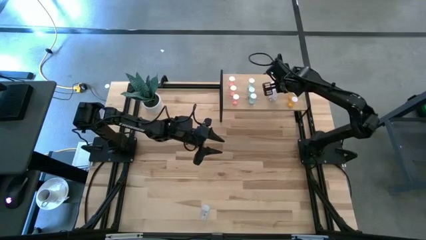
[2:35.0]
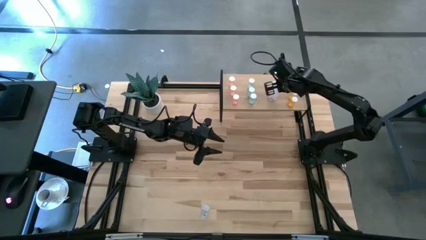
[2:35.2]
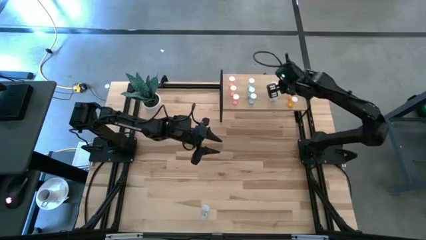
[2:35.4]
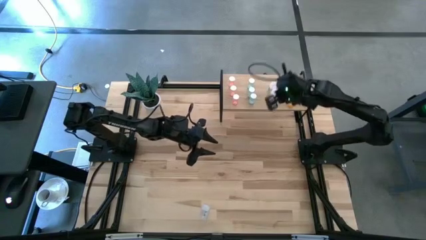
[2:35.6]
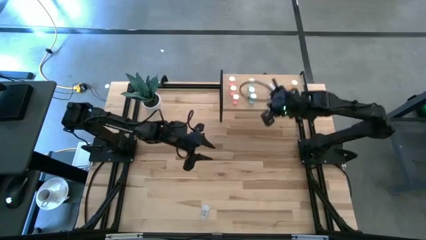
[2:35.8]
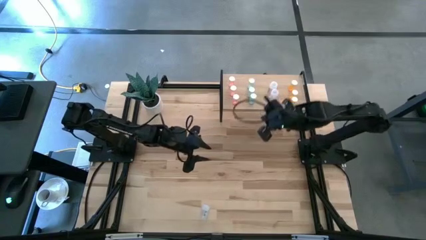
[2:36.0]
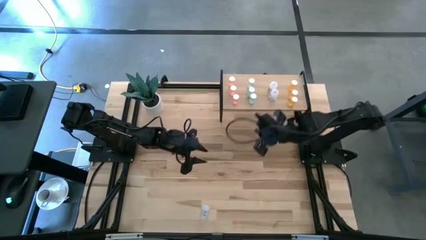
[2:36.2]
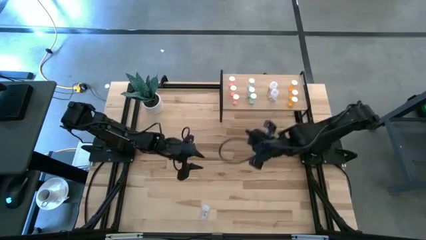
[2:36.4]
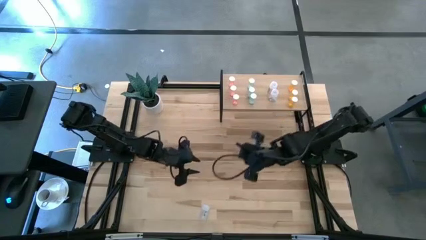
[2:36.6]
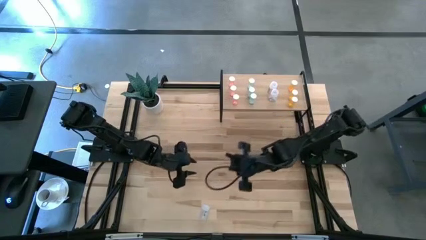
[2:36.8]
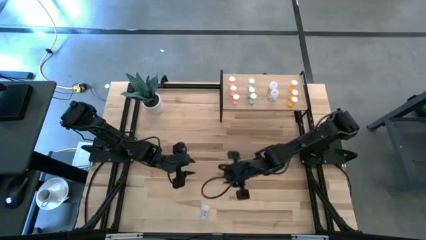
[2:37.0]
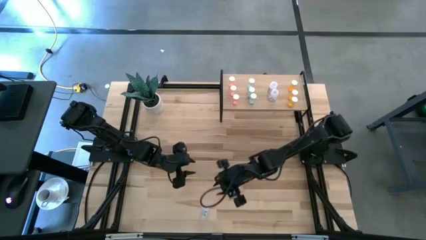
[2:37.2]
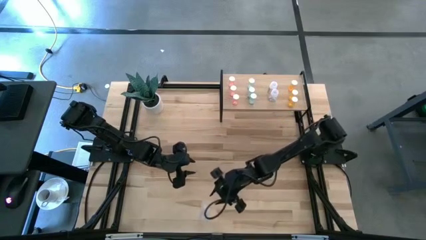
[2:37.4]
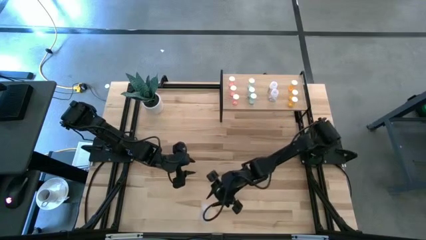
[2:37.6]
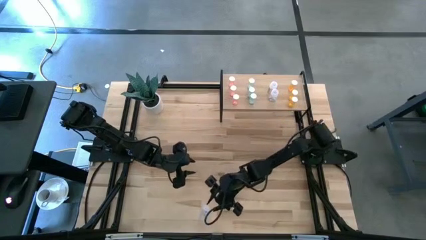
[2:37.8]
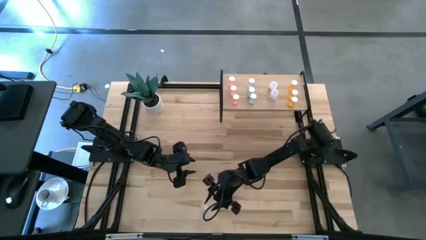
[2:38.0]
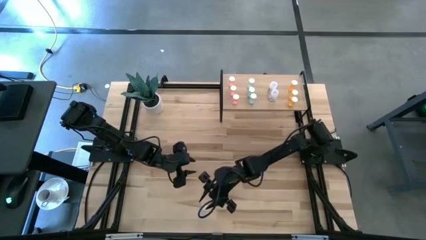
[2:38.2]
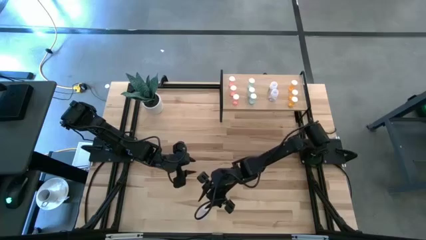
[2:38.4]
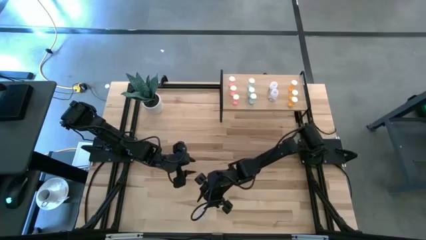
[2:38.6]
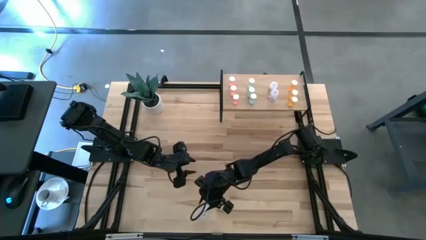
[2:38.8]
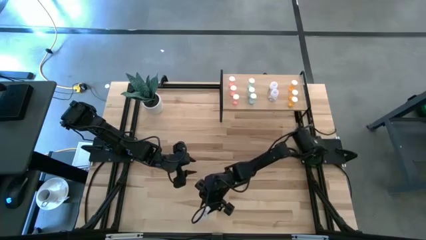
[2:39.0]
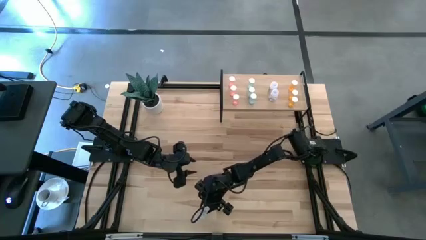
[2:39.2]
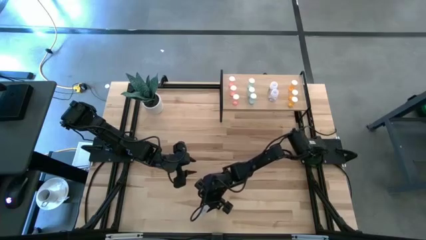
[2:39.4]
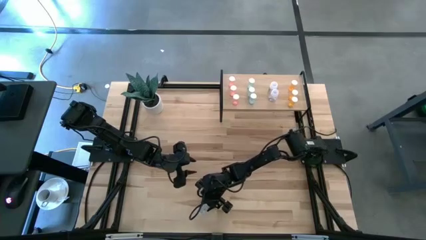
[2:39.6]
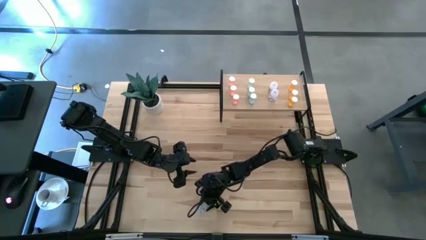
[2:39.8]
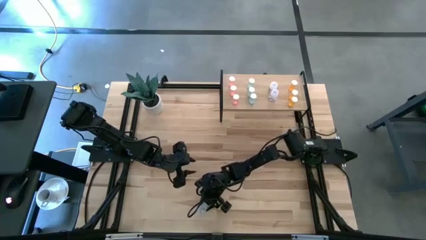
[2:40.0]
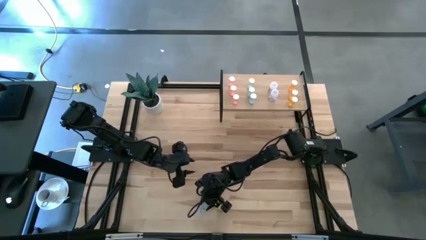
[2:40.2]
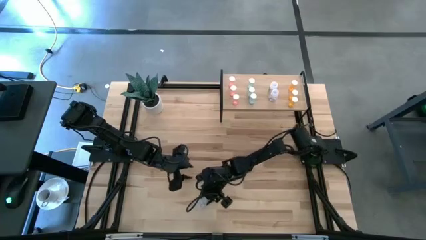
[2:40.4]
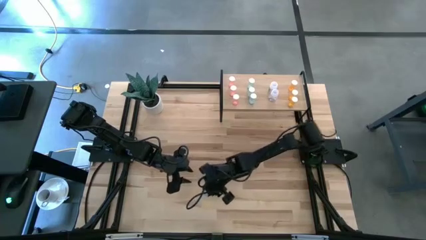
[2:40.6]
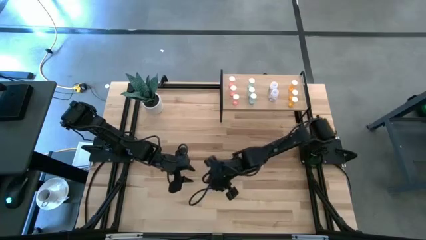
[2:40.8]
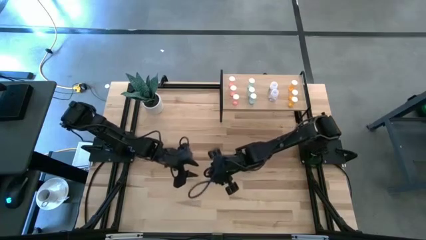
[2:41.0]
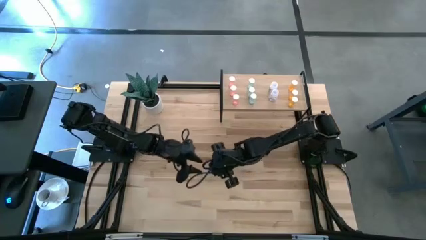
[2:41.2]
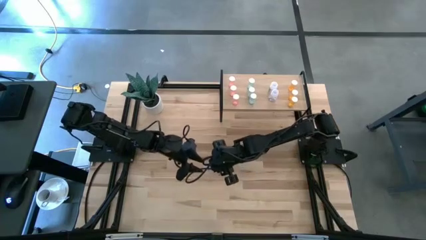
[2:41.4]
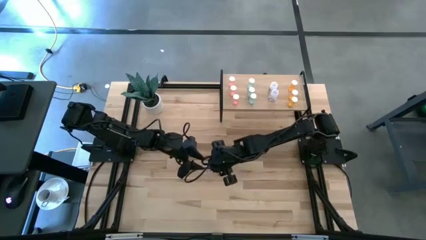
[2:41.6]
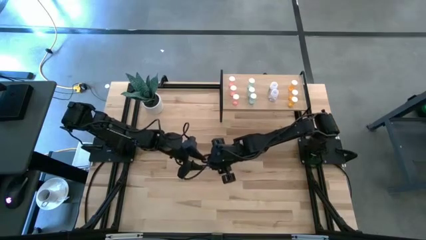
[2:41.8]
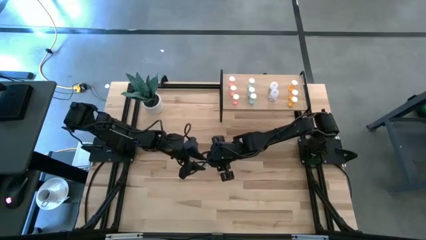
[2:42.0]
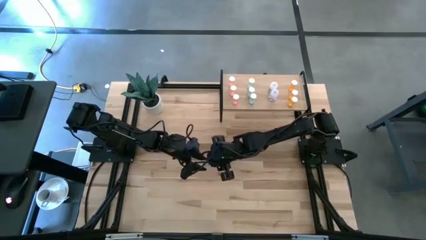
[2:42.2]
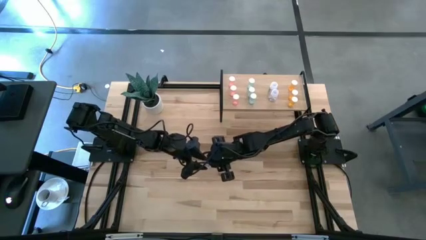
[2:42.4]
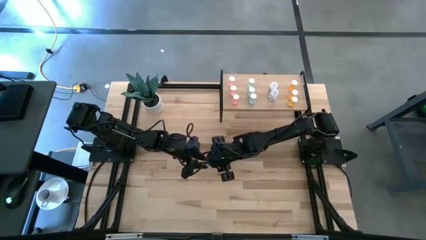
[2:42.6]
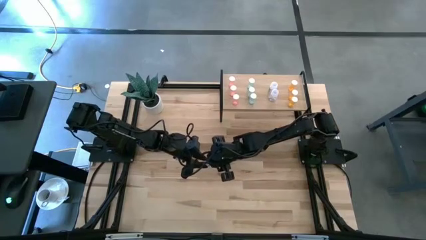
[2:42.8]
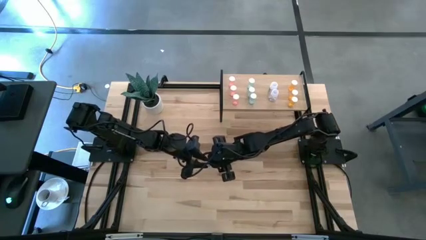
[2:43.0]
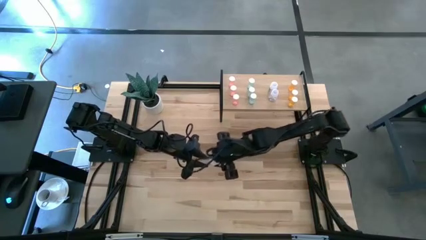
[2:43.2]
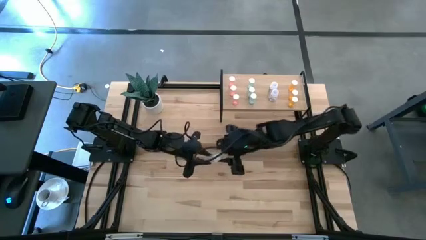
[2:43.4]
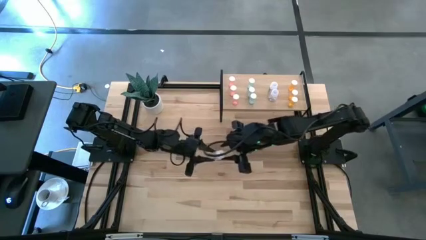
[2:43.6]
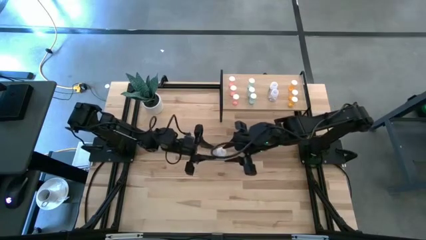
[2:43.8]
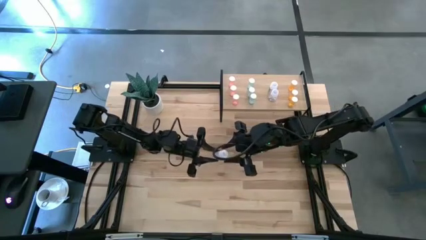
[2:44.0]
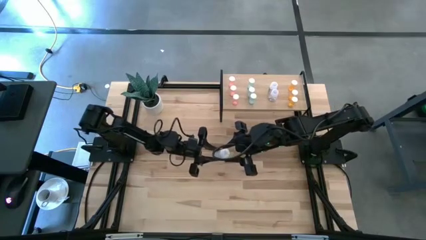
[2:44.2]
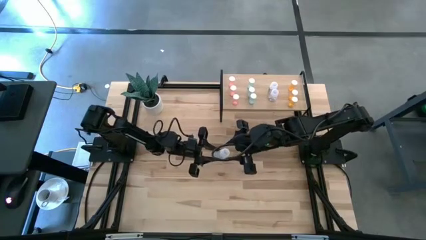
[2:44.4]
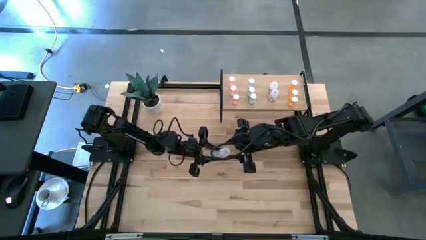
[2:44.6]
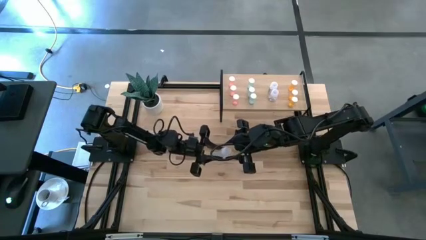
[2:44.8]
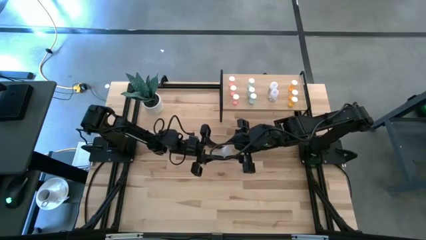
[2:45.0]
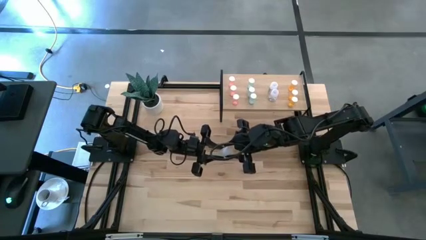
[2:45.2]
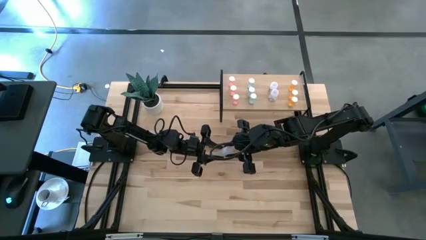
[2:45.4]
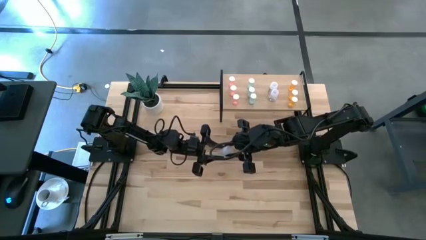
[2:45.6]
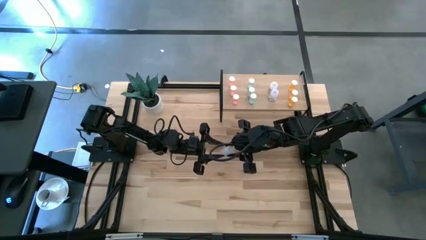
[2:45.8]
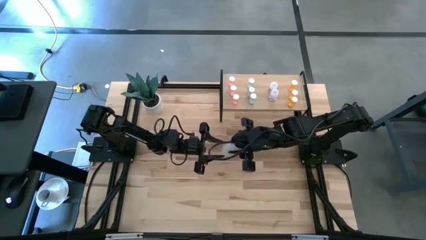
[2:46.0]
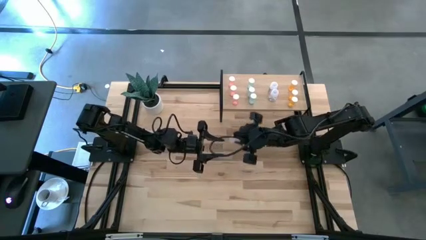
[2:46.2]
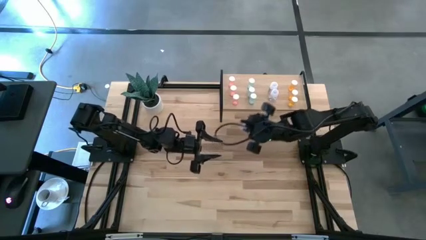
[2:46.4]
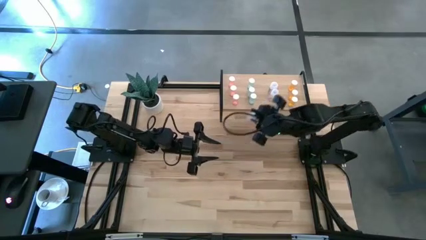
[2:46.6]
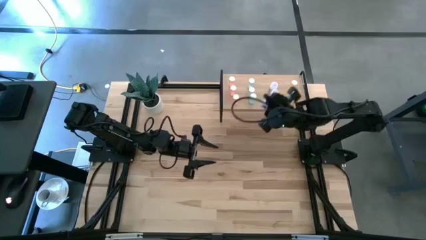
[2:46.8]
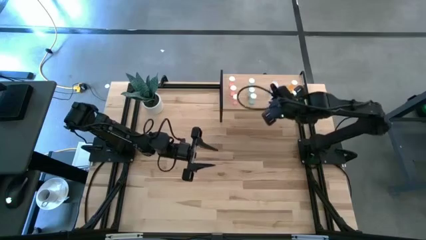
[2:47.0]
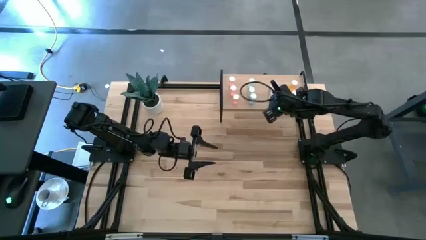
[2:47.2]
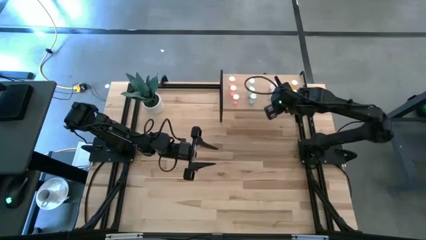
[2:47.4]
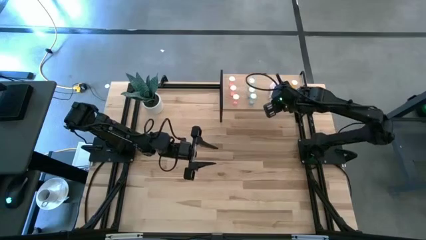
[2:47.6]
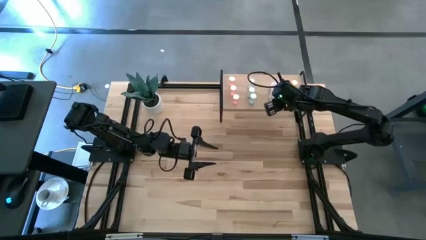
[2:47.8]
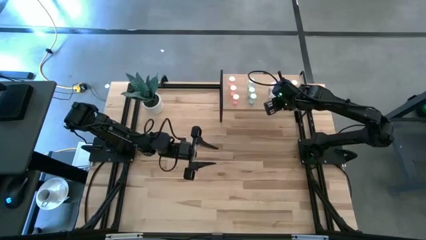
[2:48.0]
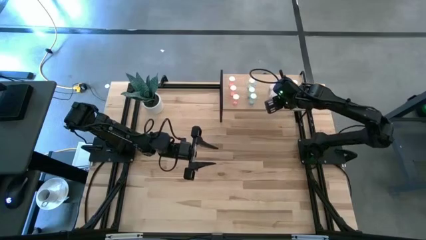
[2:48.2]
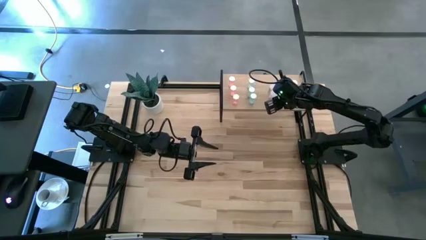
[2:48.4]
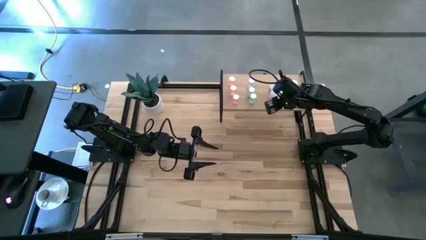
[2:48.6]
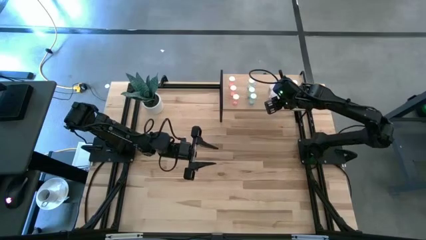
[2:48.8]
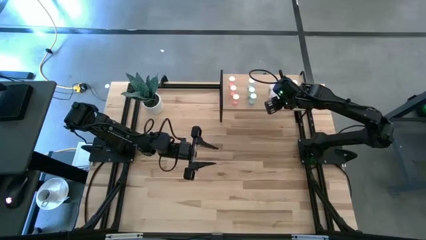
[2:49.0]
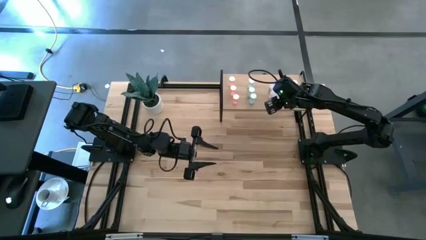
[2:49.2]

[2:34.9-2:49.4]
Task: Pick and place medicine bottles onto shelf by color
Put the transparent pill bottle on the shelf aligned with the other transparent pill bottles

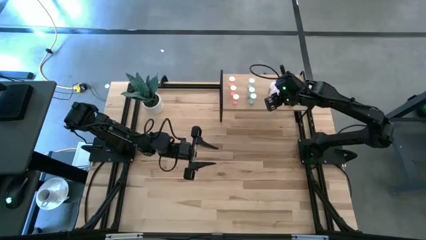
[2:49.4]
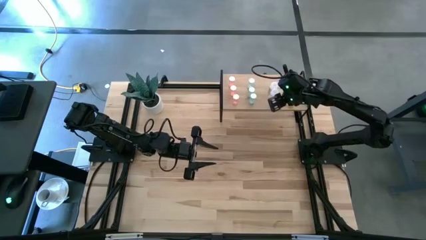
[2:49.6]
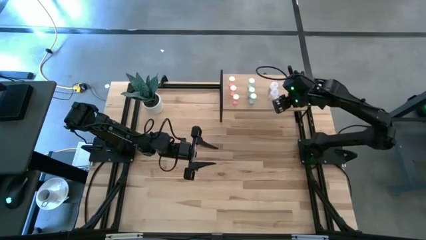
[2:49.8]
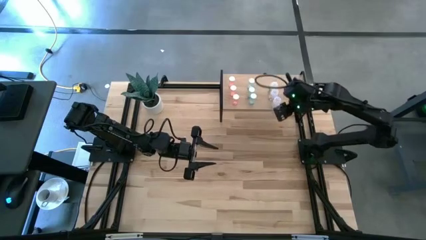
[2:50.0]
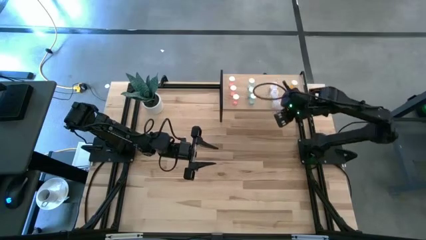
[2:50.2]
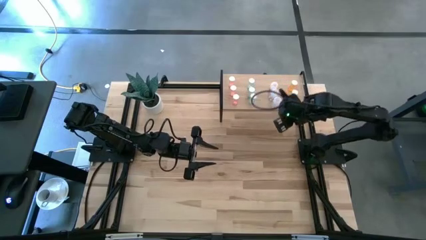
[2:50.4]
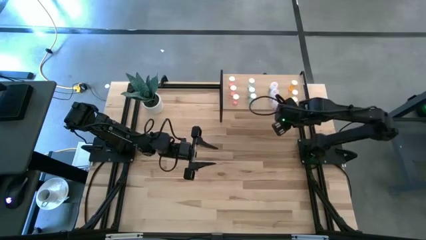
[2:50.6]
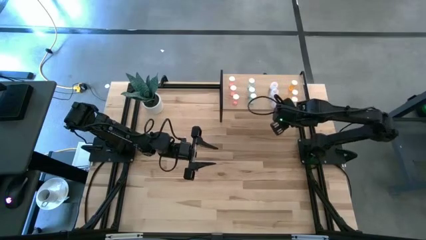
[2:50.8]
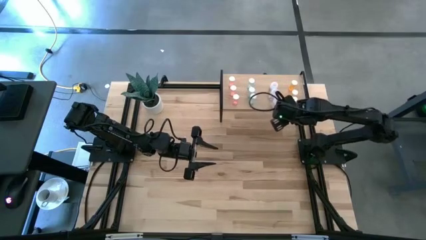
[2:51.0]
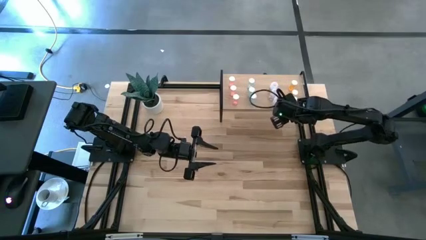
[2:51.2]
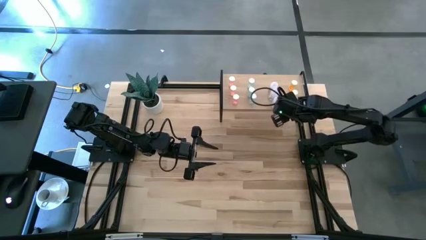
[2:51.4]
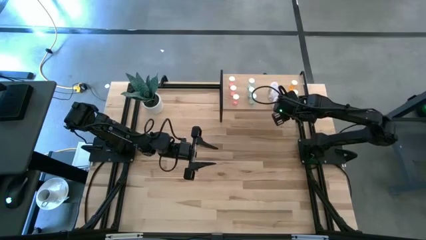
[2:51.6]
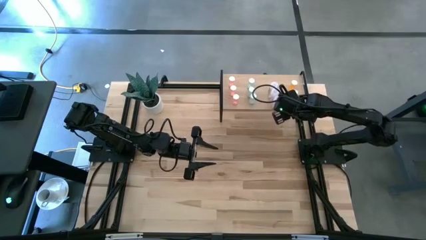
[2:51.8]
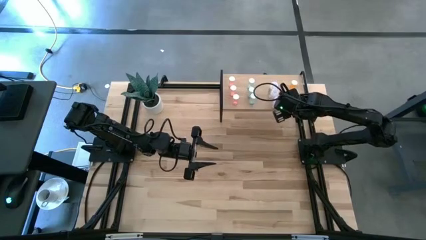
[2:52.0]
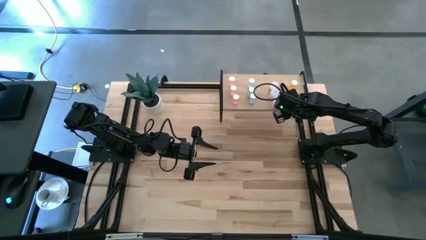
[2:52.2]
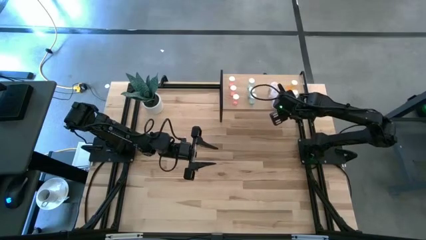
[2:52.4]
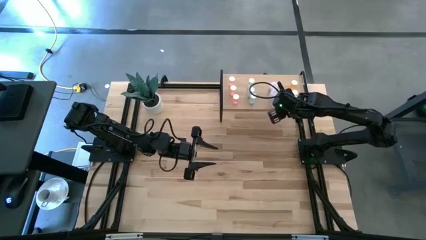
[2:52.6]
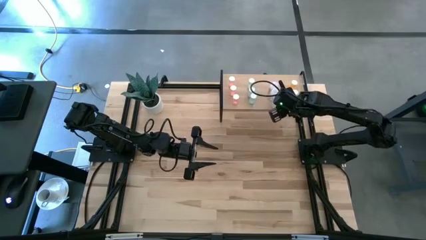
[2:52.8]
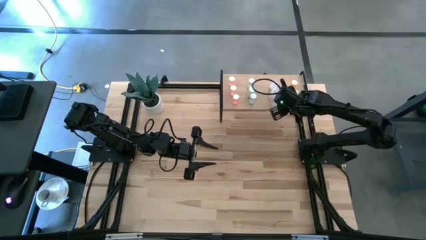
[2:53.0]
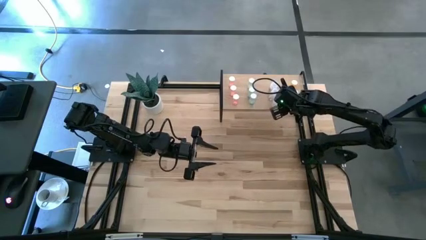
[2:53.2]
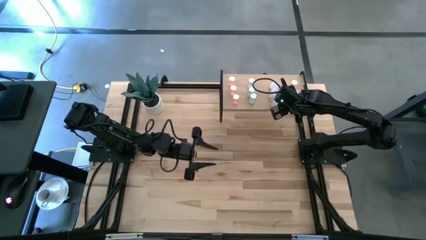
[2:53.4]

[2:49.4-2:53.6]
Adjust the orange pill bottle on the shelf
